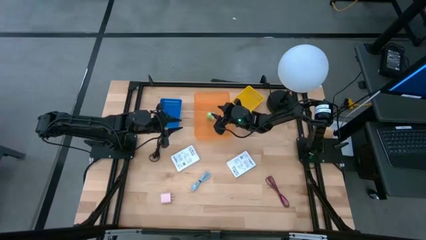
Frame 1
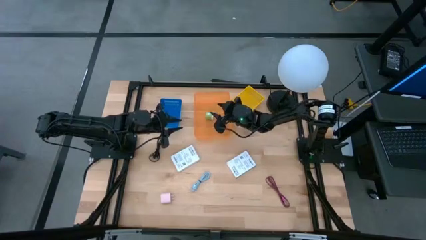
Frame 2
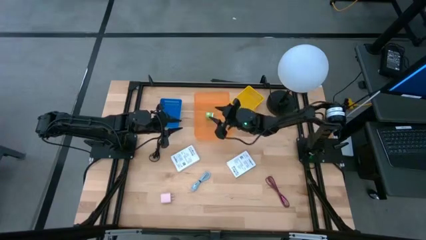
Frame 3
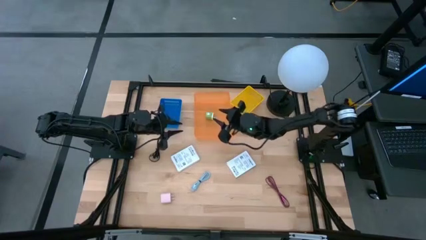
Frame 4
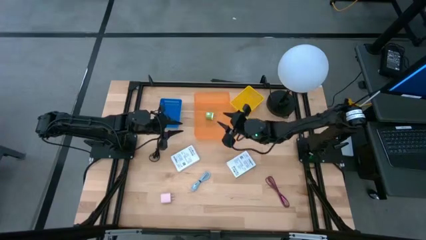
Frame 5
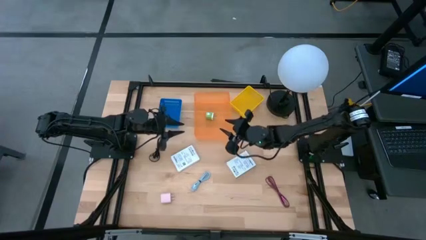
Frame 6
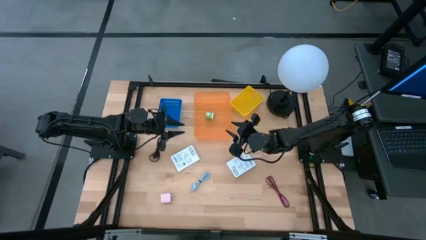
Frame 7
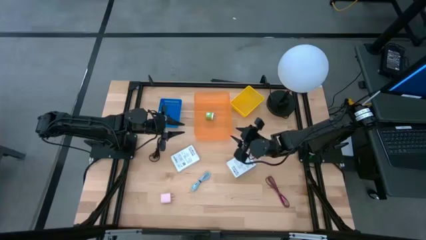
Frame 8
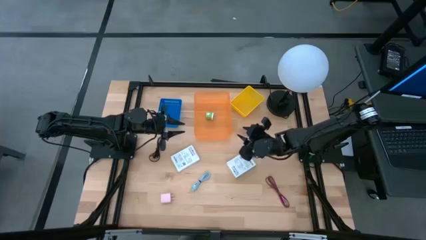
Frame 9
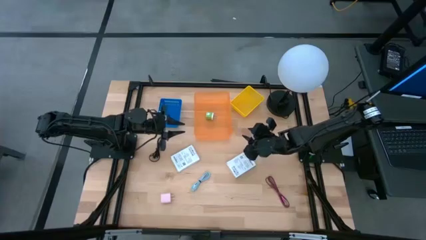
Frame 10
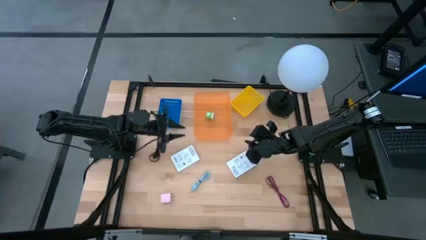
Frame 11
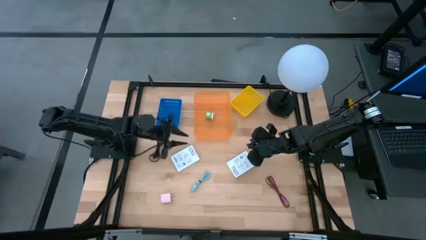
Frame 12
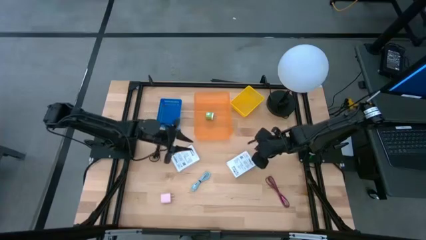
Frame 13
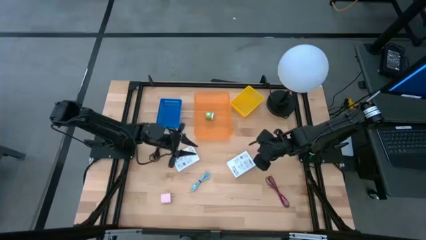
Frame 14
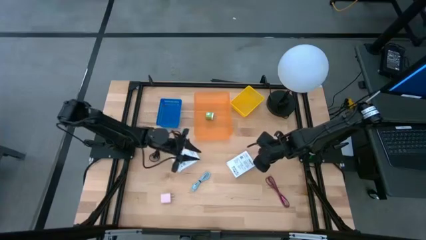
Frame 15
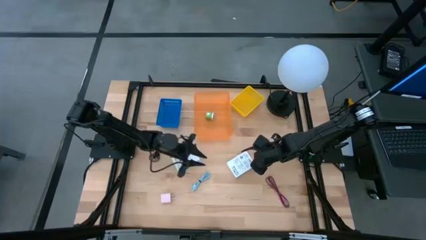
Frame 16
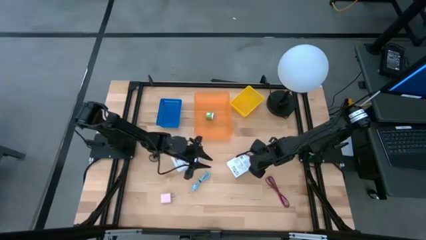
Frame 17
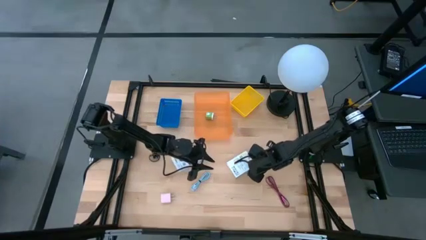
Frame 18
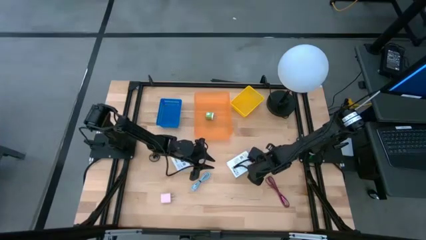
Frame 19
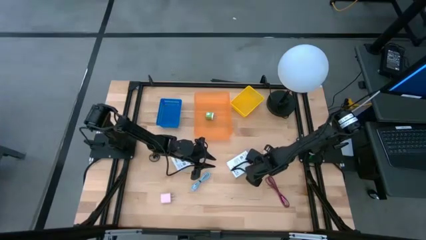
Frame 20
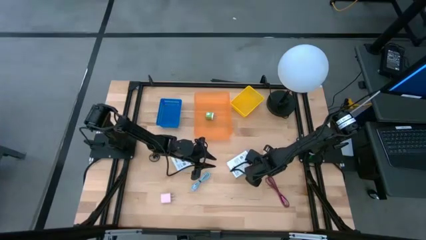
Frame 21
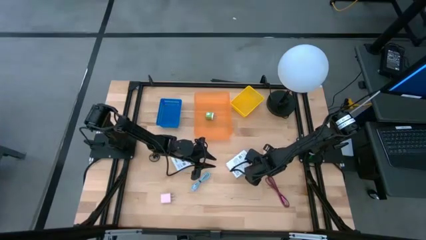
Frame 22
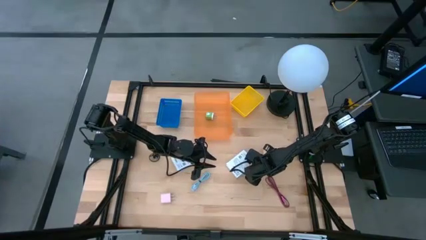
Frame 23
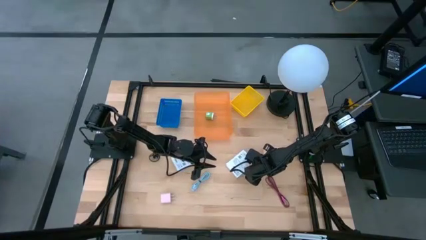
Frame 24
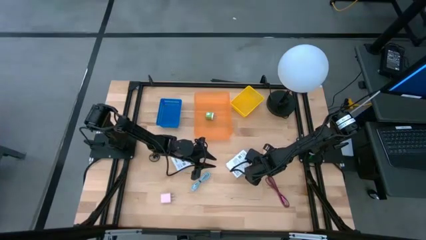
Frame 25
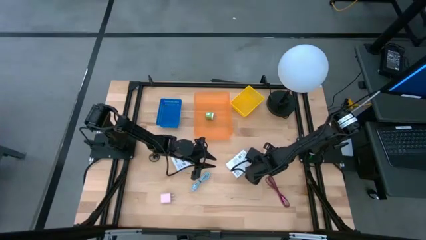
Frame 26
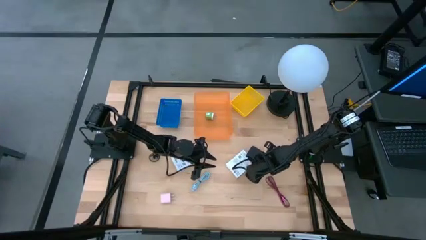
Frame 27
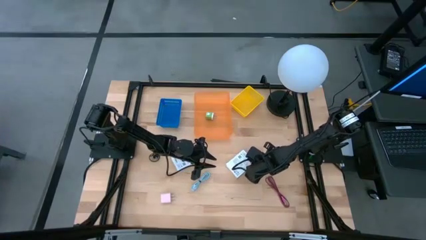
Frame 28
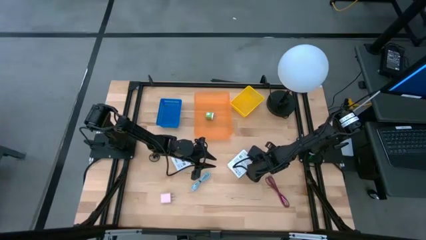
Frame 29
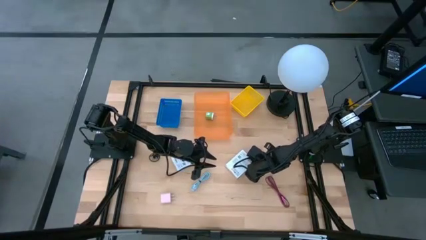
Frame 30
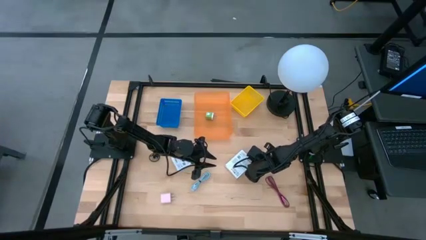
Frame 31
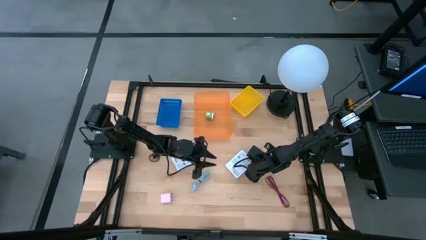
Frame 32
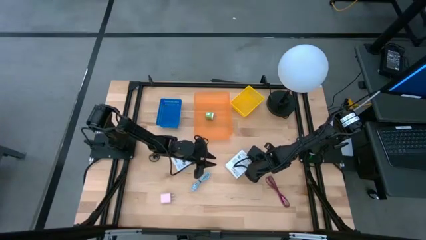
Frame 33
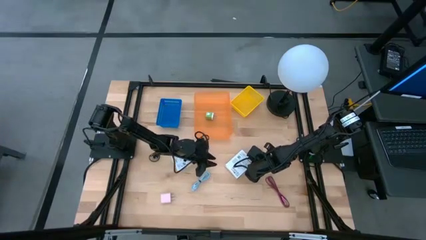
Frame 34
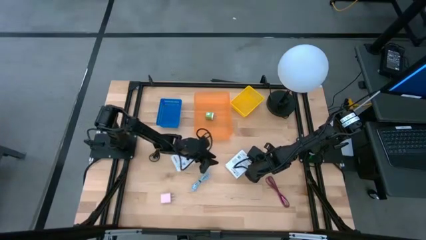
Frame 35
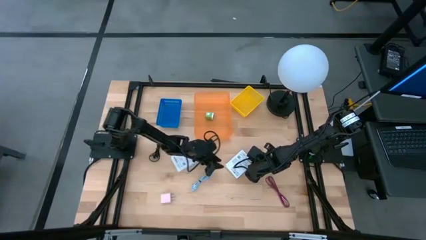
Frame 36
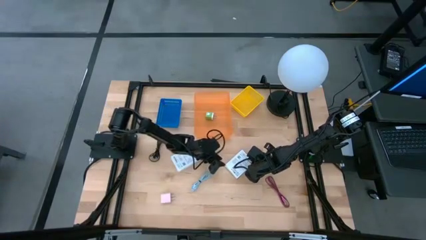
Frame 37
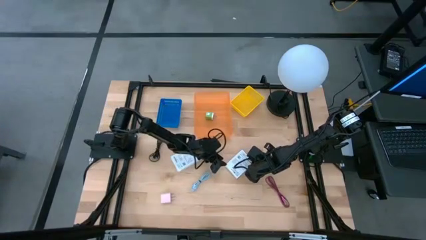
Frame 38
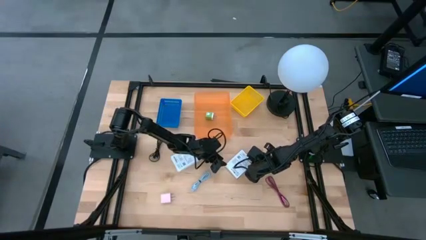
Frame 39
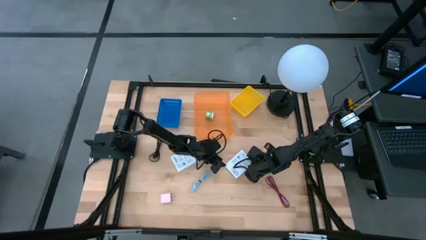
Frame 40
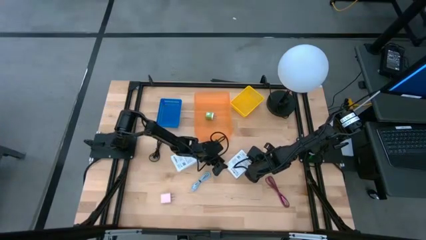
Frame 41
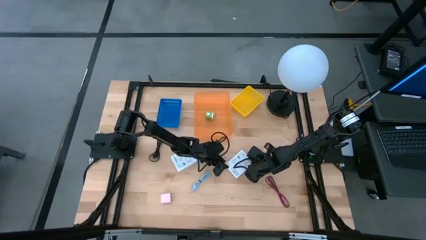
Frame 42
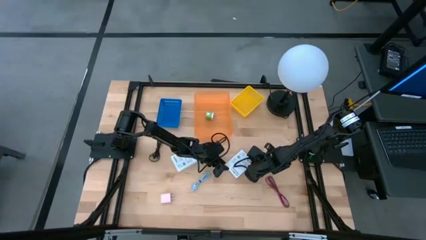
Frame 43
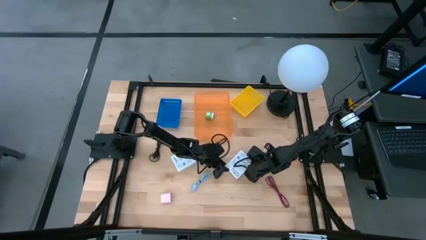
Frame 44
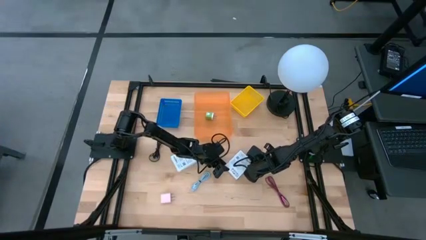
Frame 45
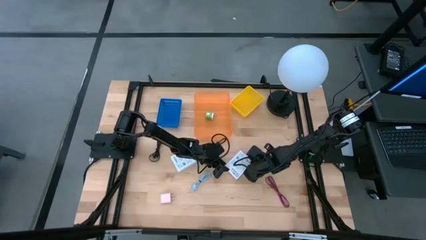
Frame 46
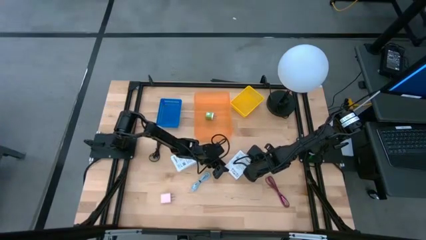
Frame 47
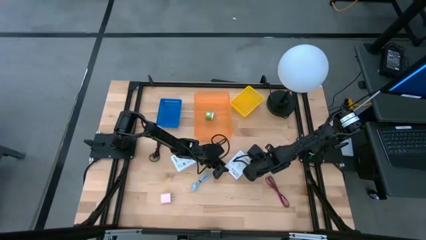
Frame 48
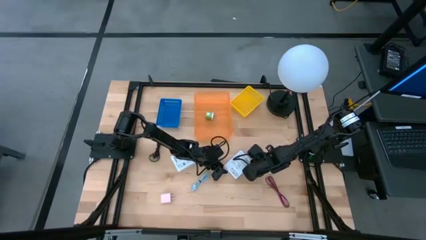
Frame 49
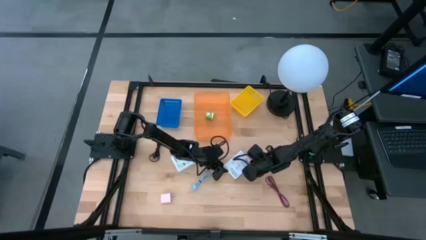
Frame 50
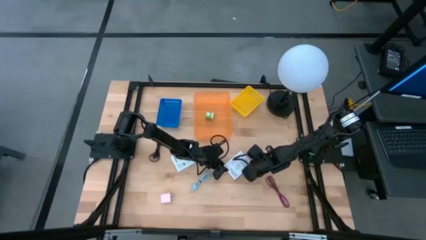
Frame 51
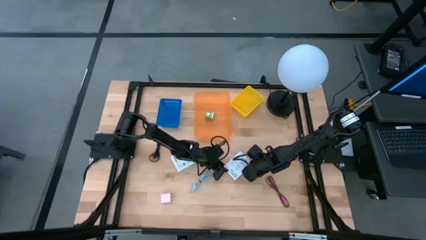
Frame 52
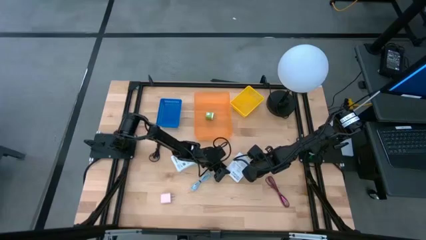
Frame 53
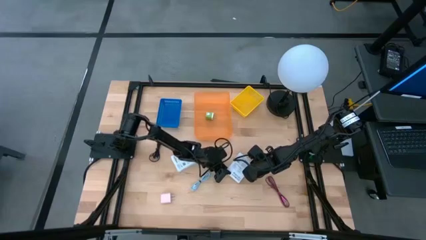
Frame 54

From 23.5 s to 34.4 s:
Task: Pick and place items into bin
Put the right card reader box into the yellow basket
